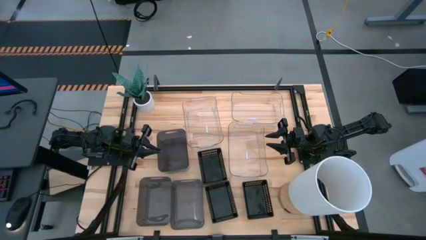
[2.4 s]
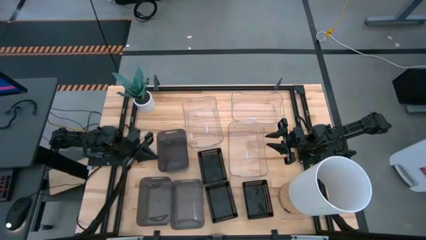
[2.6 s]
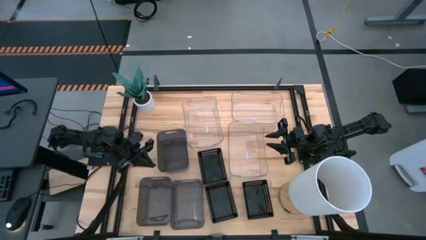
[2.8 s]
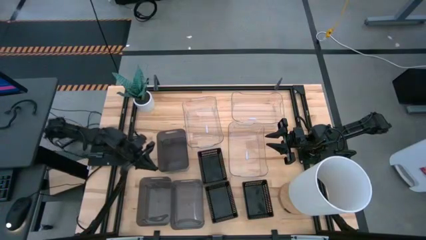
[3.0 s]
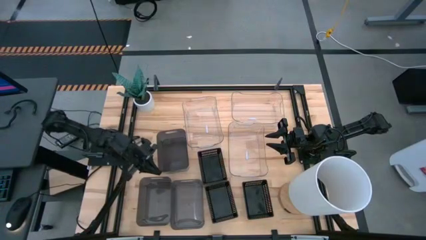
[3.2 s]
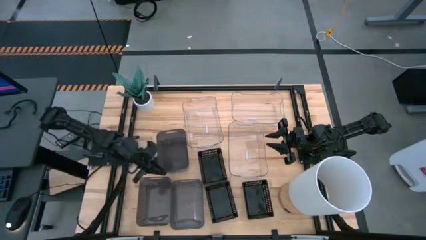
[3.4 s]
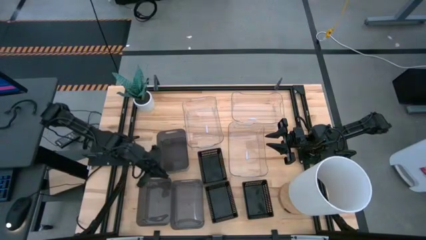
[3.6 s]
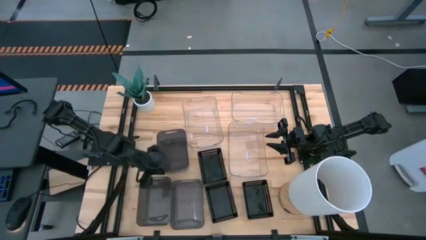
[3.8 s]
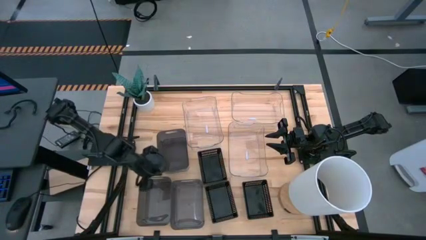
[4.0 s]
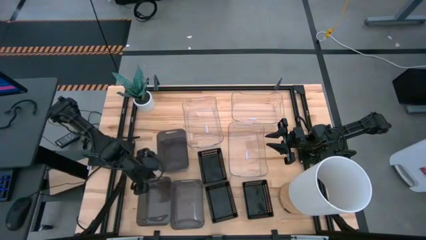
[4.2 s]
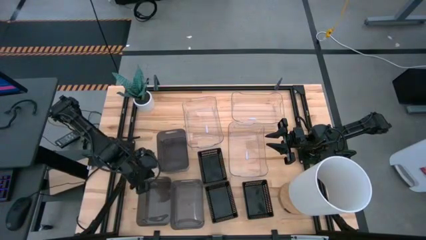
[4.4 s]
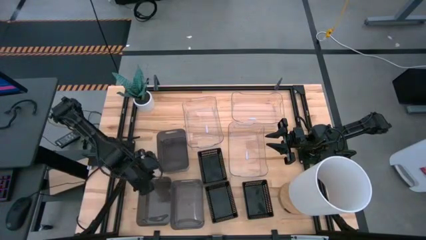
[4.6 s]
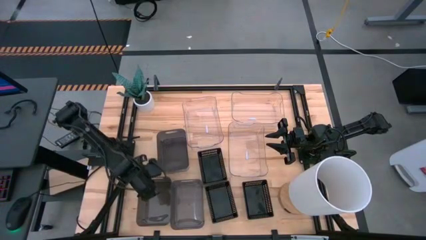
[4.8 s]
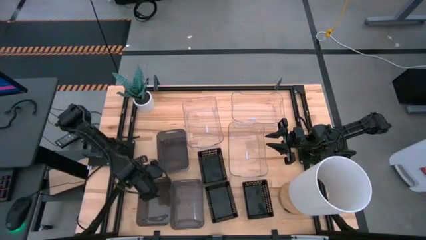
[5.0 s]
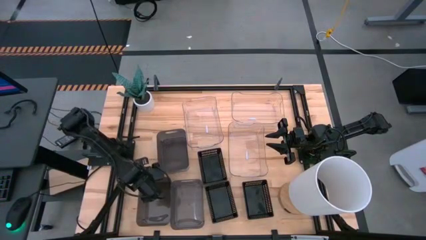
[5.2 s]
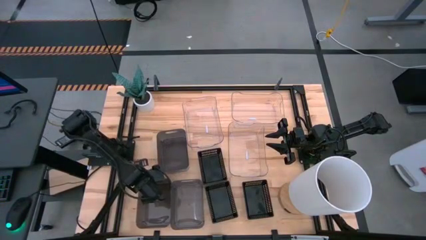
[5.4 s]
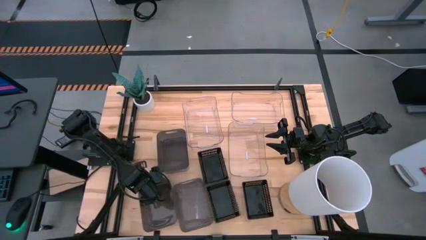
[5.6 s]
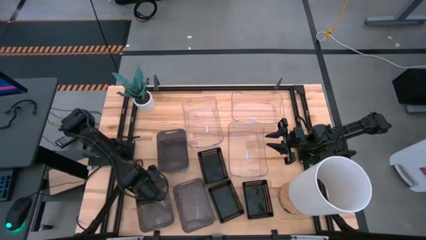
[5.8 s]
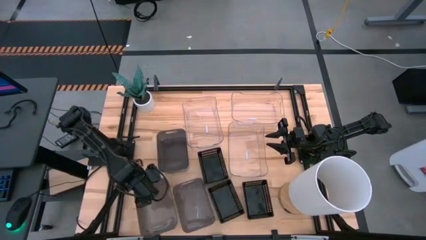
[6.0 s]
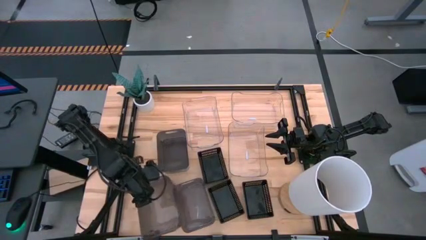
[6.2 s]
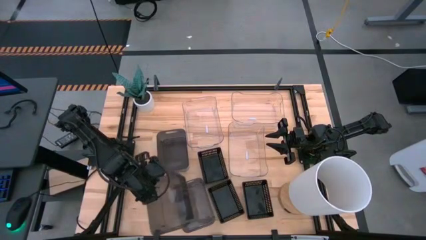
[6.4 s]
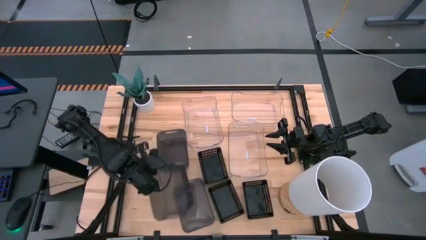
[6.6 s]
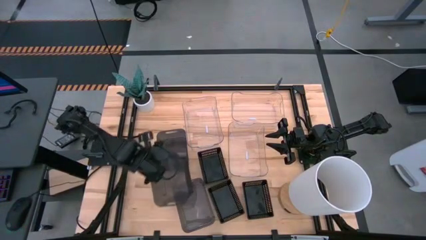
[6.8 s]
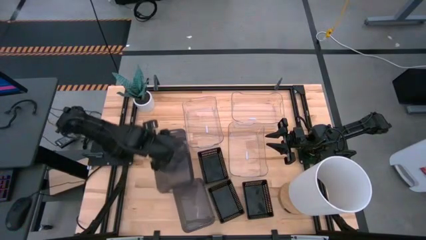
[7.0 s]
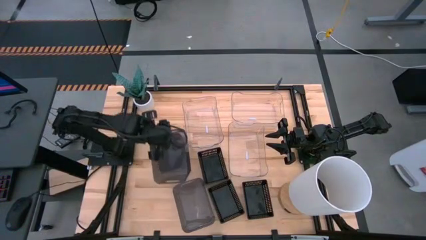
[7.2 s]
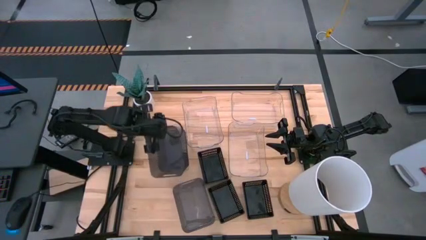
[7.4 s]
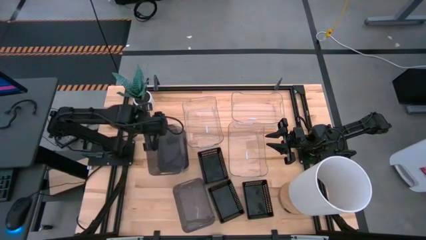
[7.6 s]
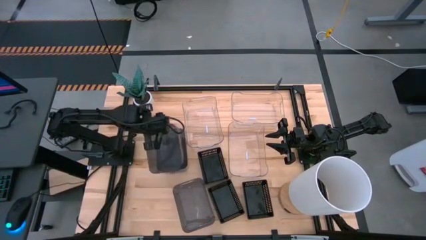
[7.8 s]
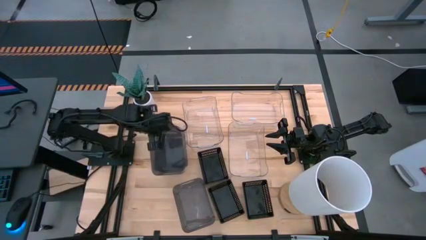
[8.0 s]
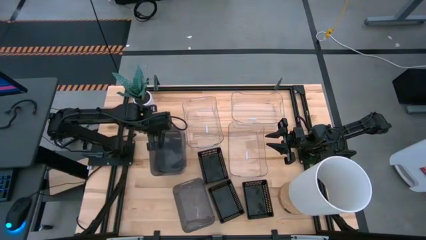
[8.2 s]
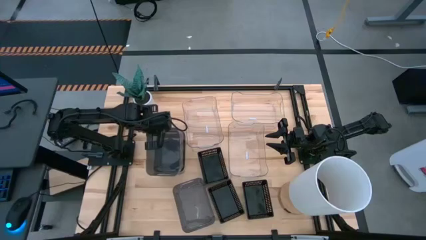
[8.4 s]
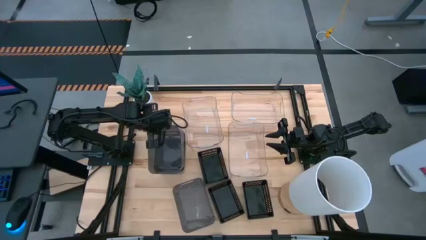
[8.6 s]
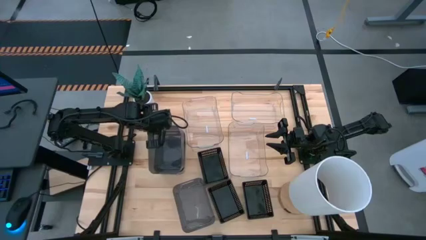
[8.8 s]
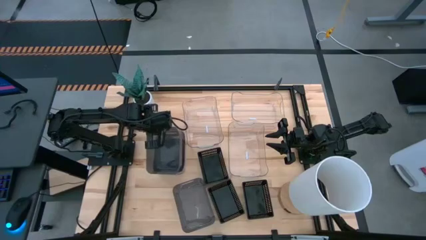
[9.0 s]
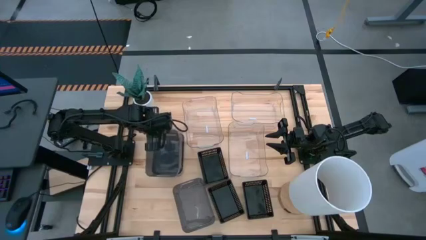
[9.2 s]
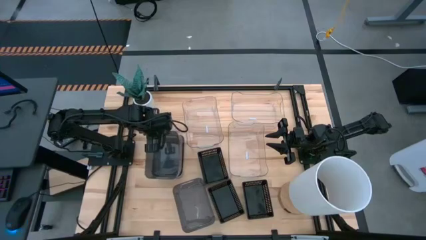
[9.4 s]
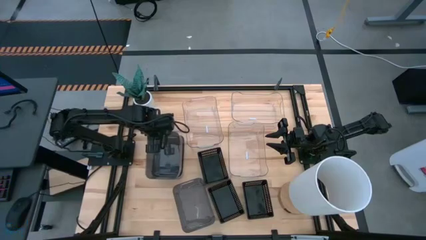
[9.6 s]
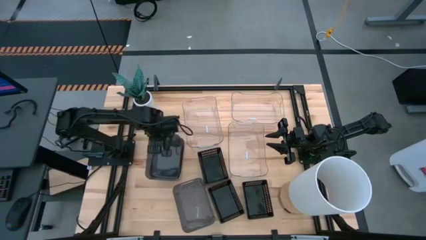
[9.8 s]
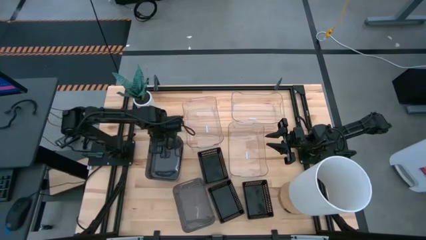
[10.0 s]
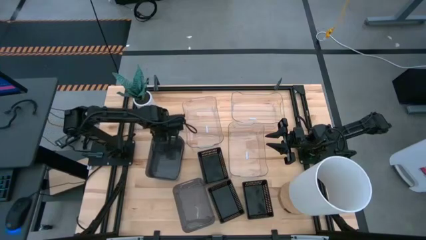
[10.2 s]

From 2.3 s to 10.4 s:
Stack the bottom left gray bin on the top gray bin

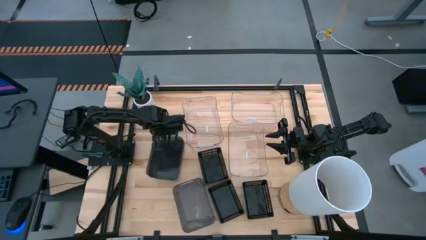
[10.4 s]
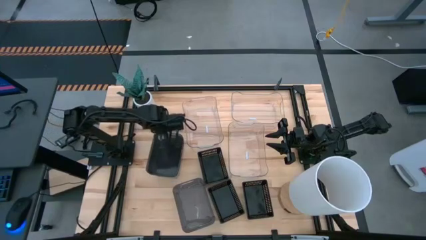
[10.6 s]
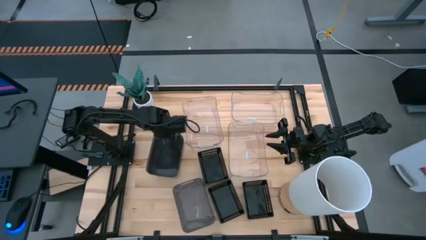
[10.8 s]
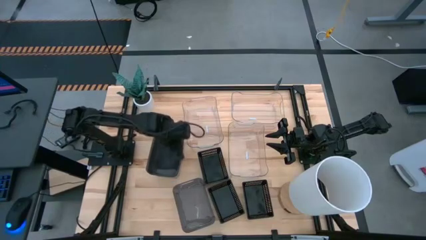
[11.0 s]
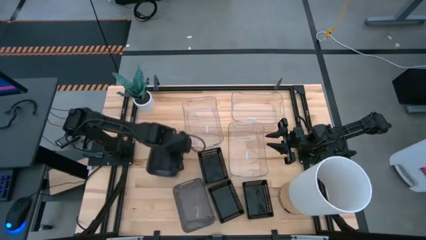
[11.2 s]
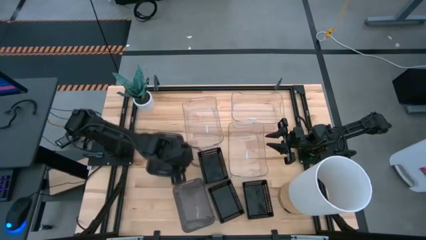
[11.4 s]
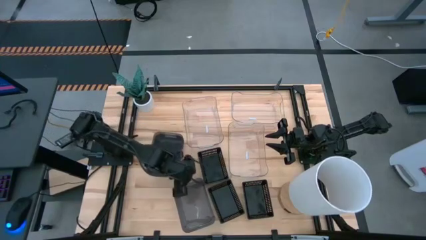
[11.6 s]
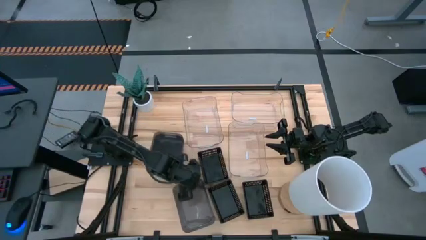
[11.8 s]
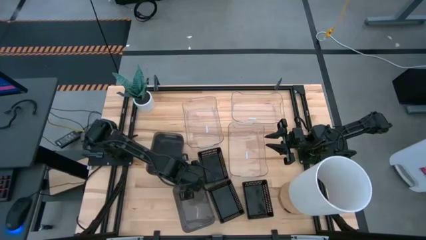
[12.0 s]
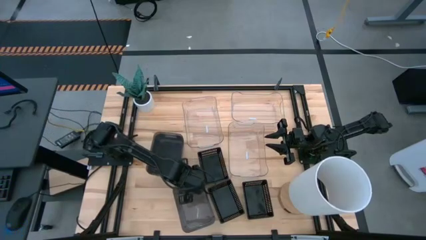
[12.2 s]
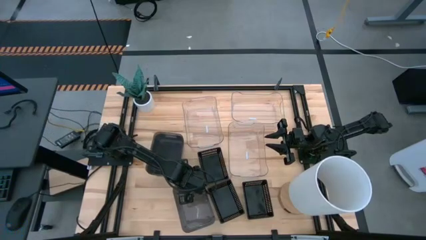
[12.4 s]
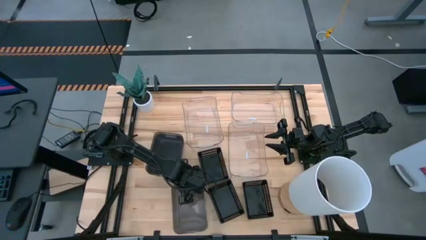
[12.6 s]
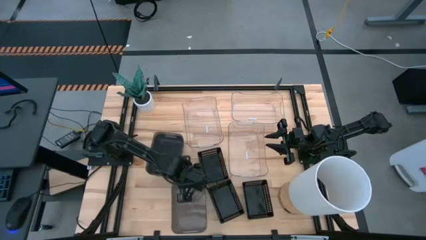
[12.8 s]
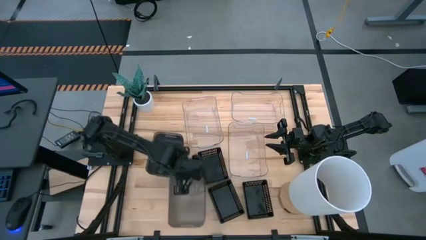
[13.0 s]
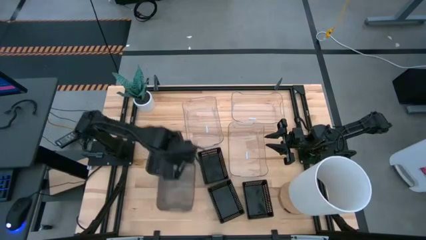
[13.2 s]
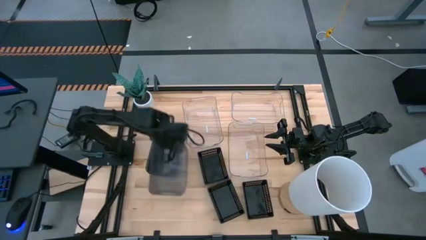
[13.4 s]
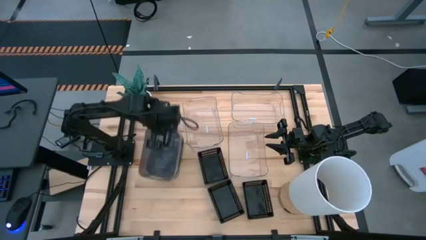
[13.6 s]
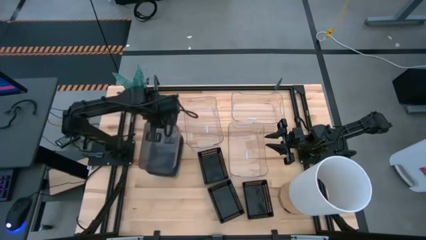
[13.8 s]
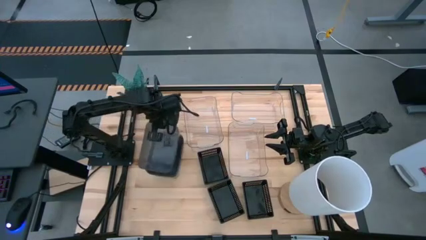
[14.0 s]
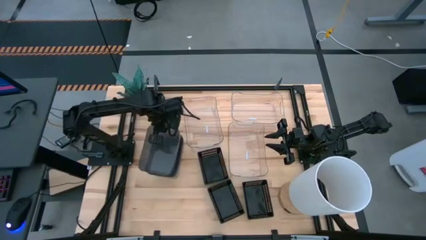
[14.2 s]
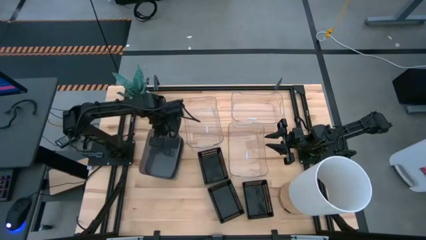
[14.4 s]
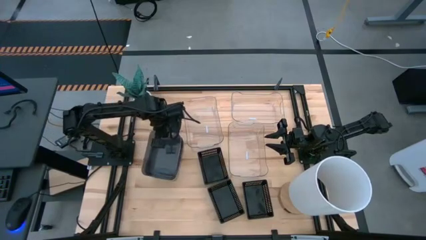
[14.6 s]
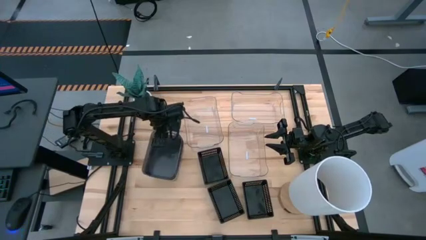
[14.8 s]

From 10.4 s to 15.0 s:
Stack the bottom gray bin on the gray bins

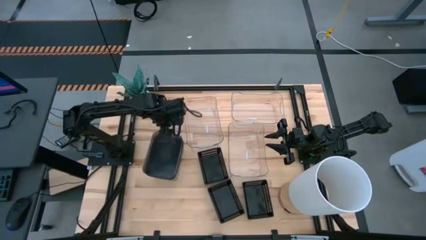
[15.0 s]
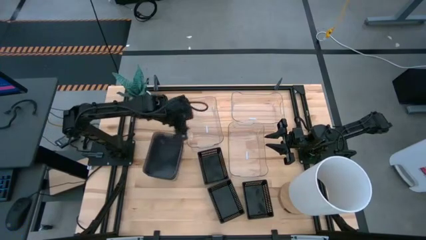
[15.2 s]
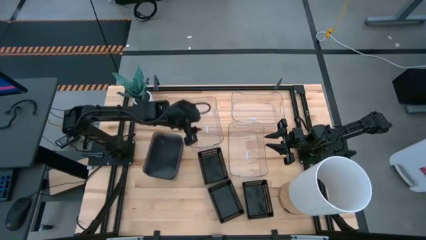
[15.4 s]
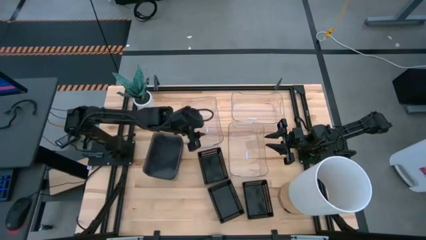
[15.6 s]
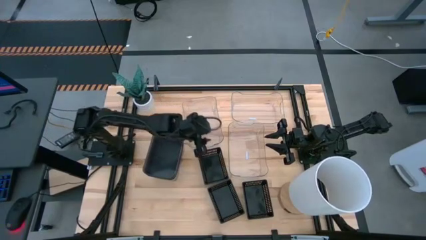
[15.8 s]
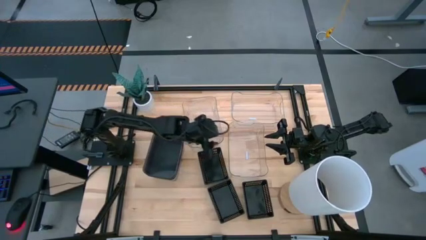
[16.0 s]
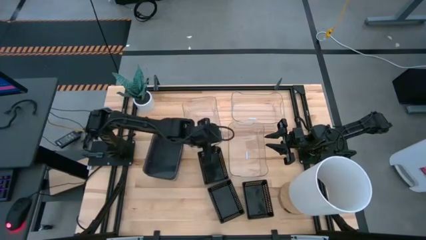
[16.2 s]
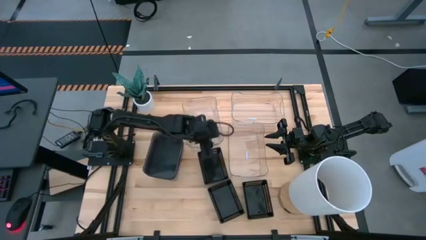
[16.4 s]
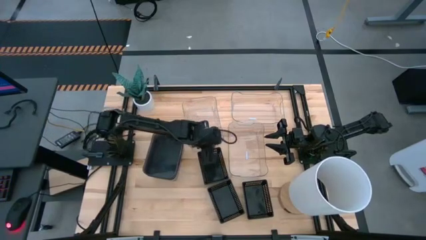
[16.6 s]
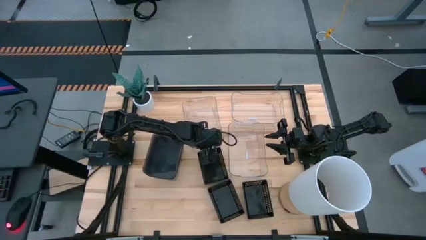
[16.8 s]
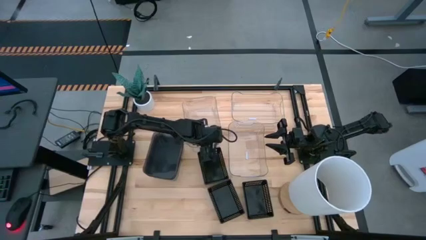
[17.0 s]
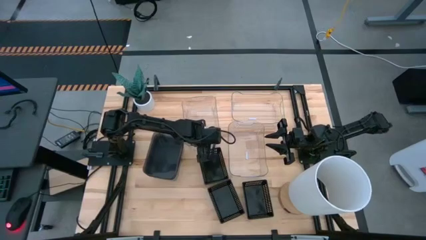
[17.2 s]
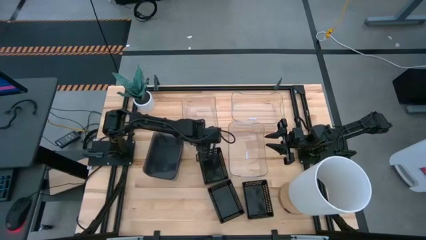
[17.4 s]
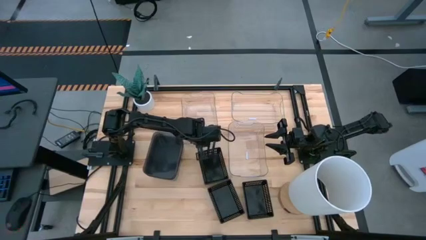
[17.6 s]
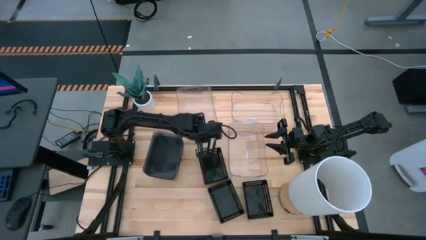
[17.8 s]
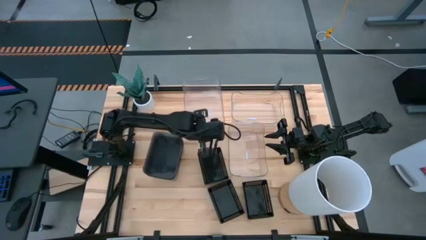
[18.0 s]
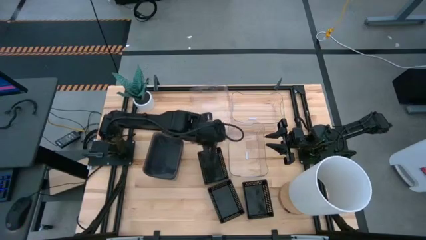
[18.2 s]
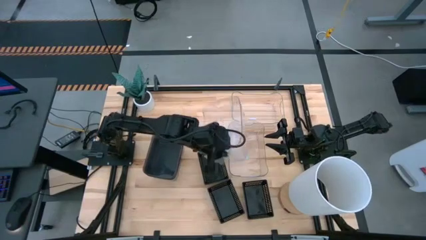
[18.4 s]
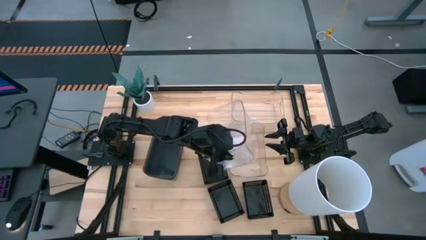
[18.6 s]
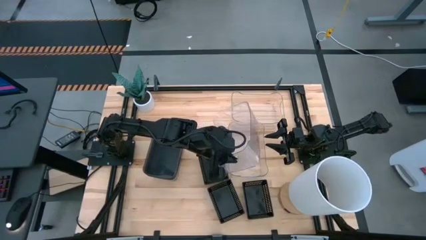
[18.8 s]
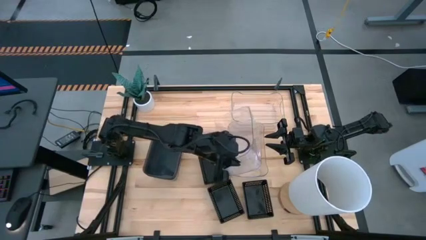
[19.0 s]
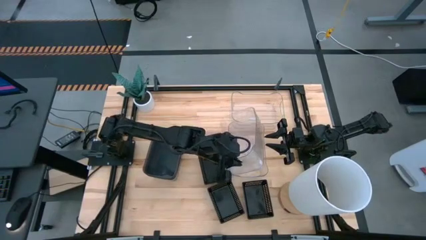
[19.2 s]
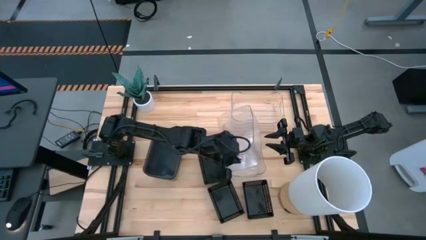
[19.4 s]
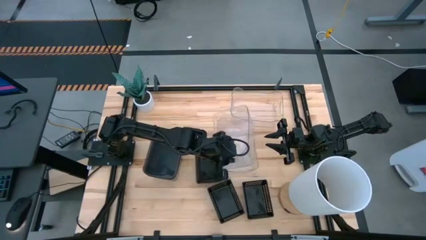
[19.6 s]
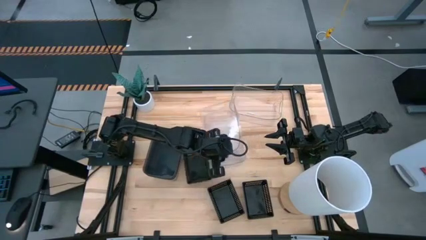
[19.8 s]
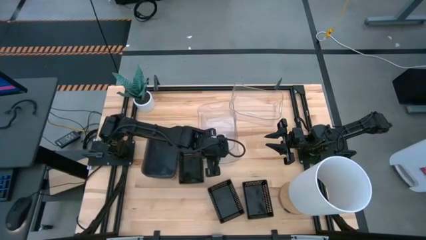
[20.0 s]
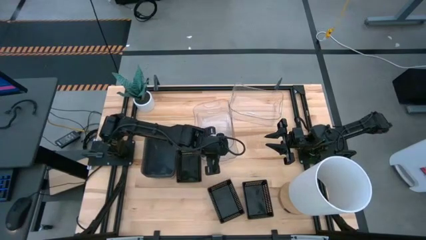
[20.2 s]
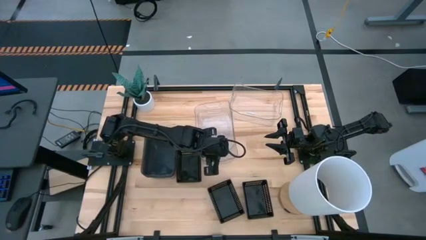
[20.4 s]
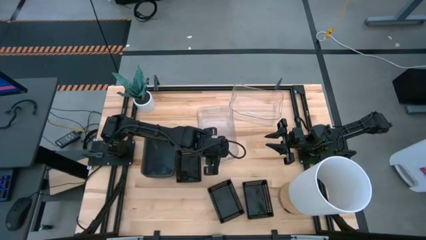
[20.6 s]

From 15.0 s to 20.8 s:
Stack the left transparent bin on the bottom transparent bin
